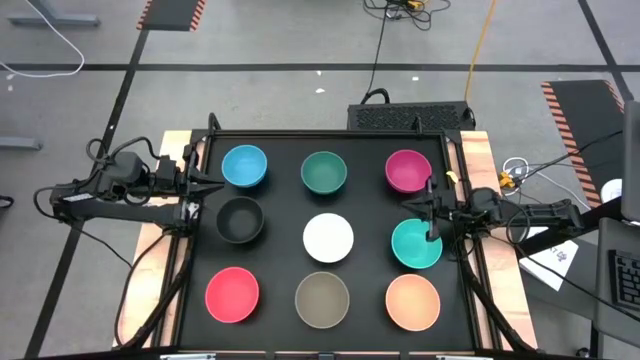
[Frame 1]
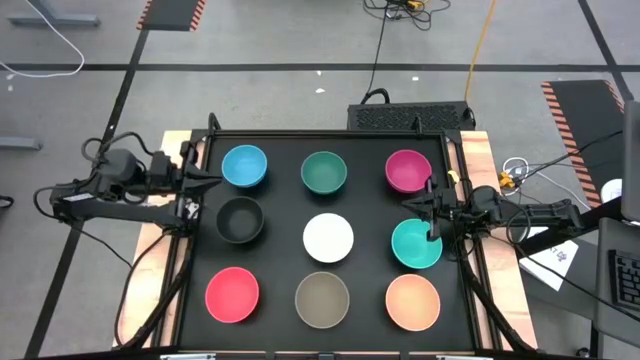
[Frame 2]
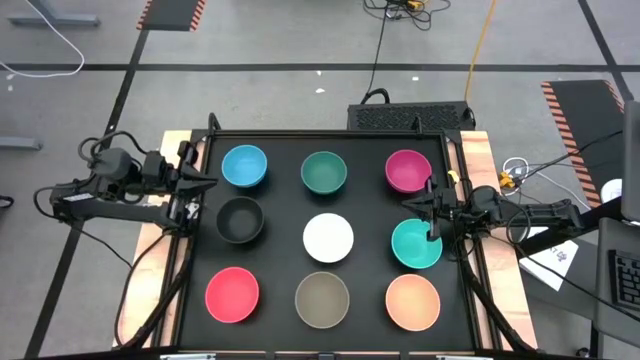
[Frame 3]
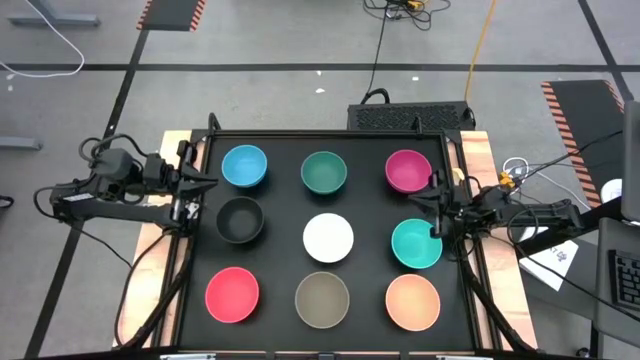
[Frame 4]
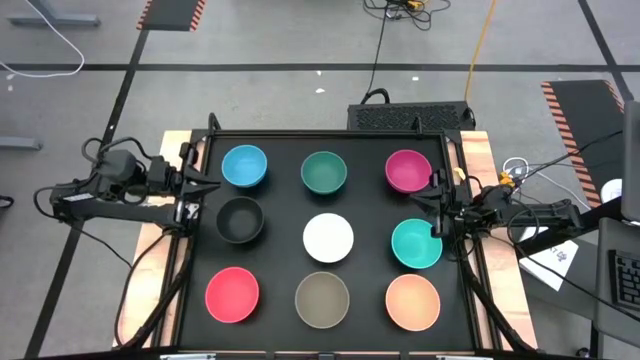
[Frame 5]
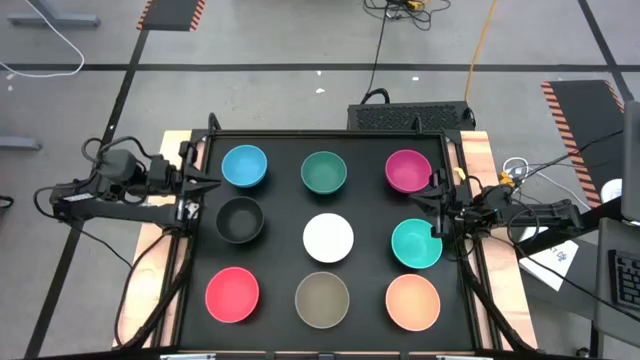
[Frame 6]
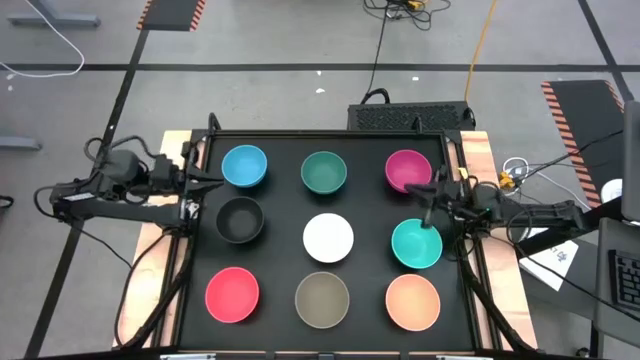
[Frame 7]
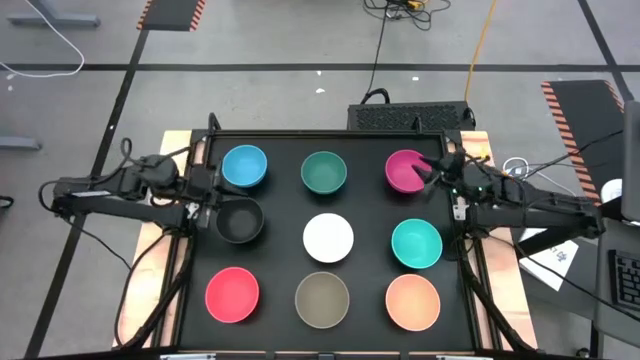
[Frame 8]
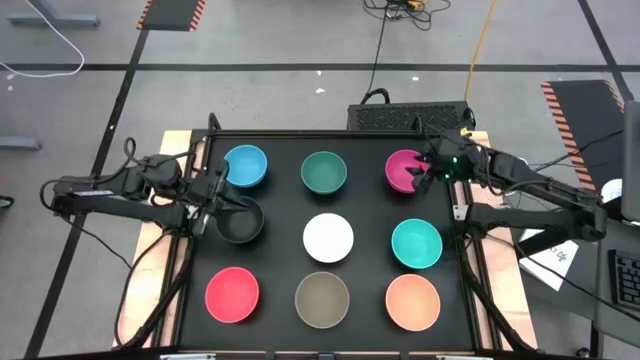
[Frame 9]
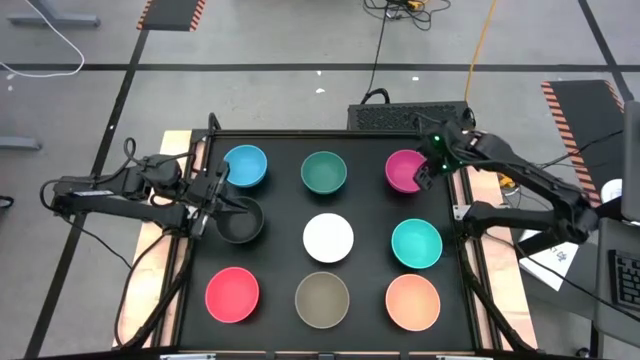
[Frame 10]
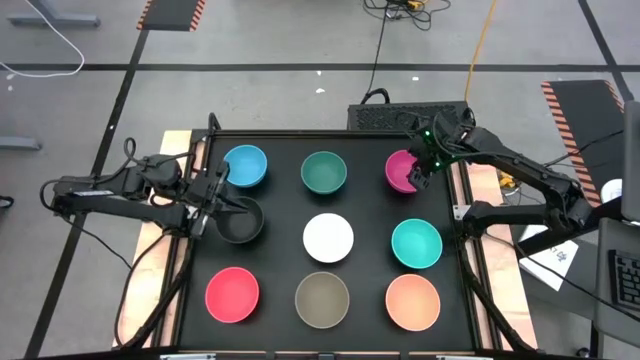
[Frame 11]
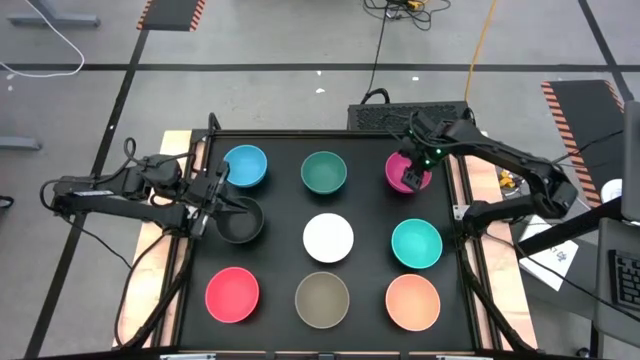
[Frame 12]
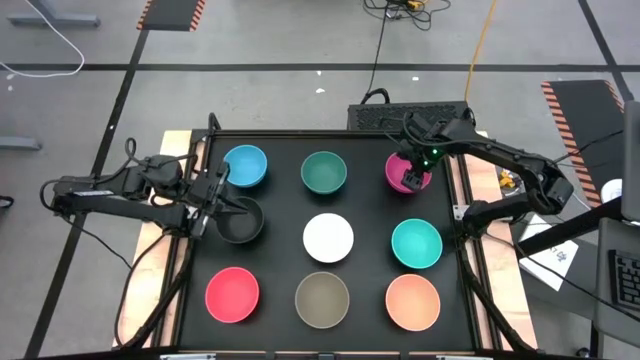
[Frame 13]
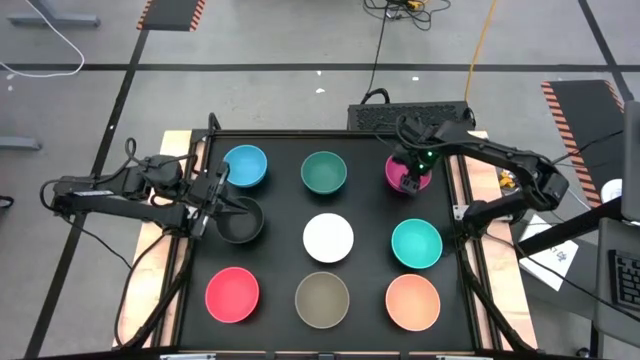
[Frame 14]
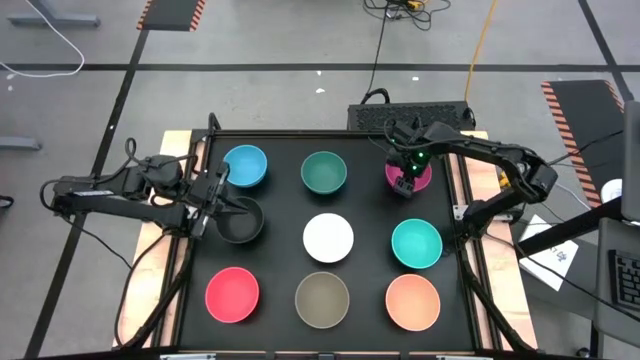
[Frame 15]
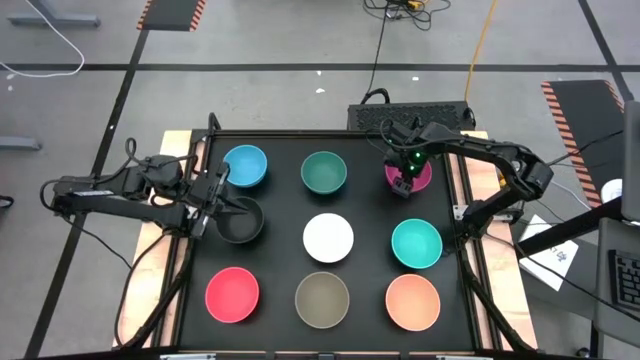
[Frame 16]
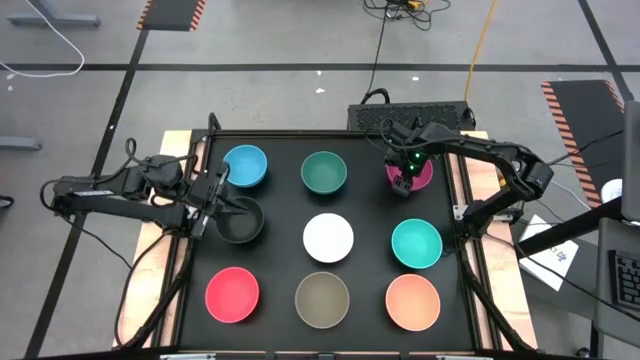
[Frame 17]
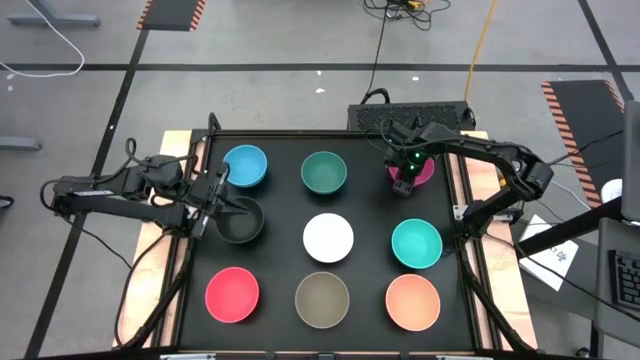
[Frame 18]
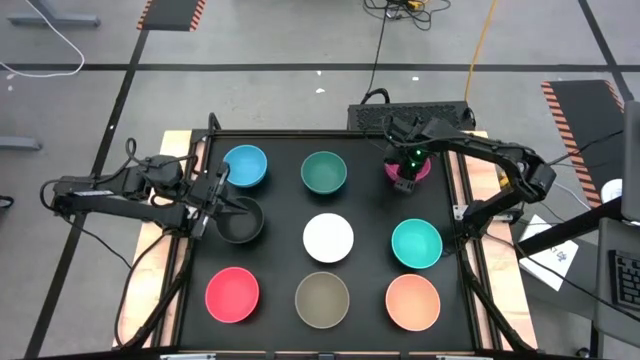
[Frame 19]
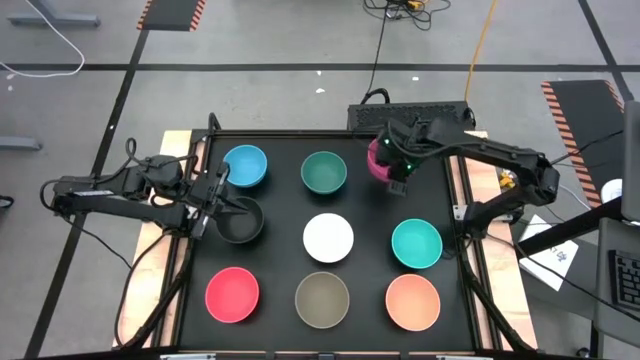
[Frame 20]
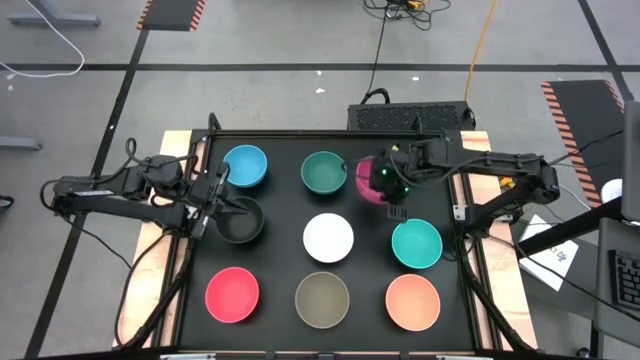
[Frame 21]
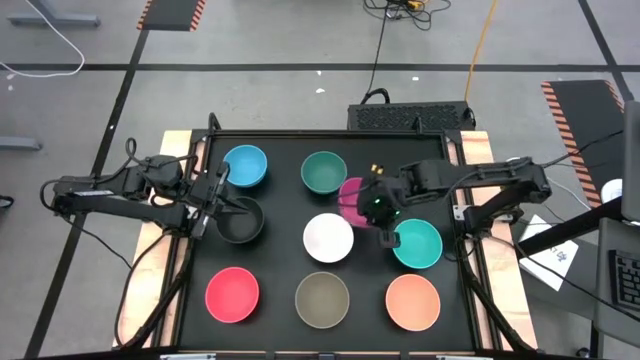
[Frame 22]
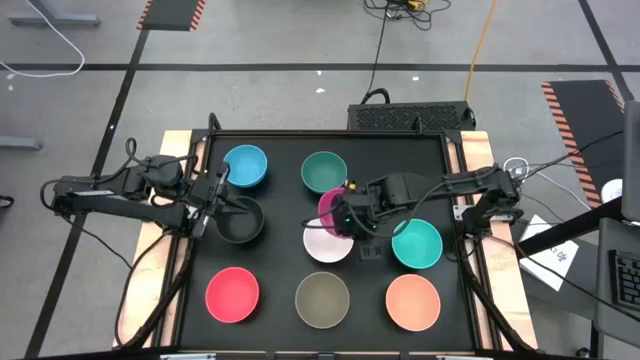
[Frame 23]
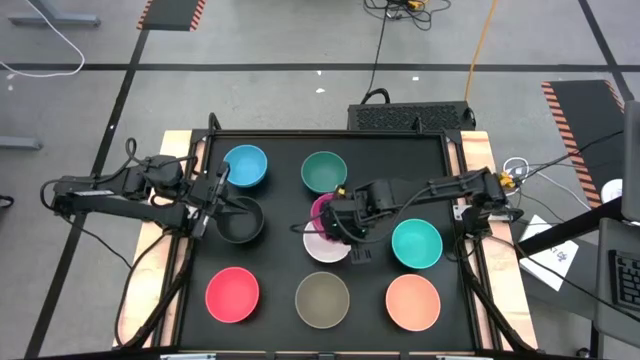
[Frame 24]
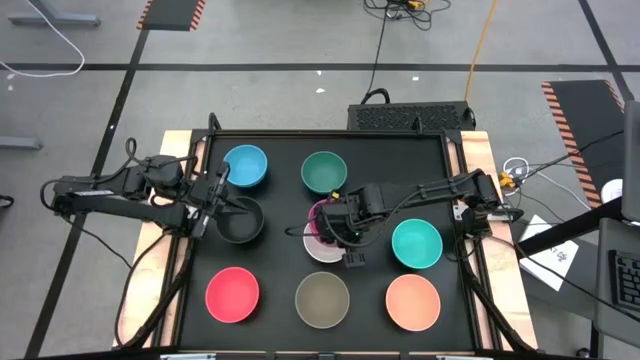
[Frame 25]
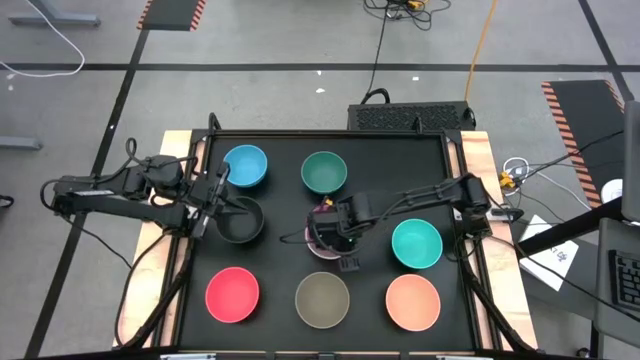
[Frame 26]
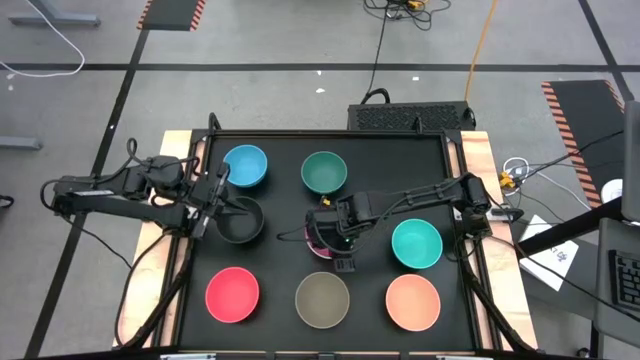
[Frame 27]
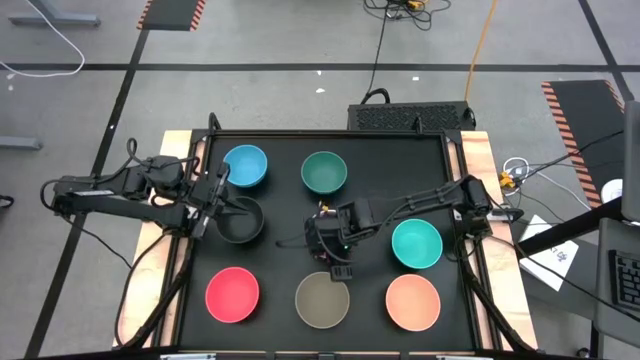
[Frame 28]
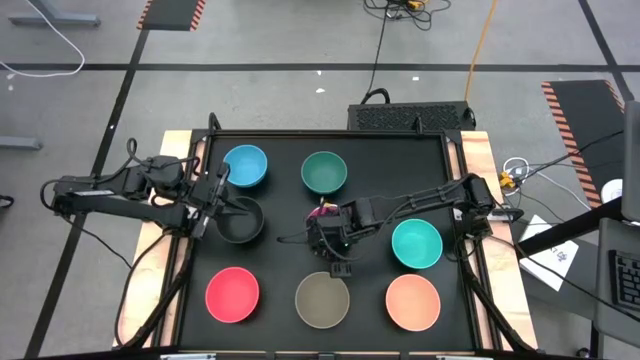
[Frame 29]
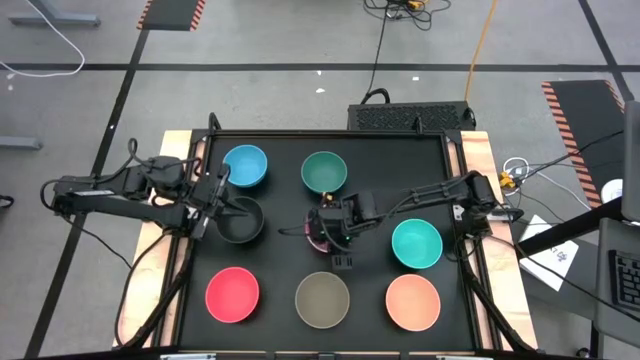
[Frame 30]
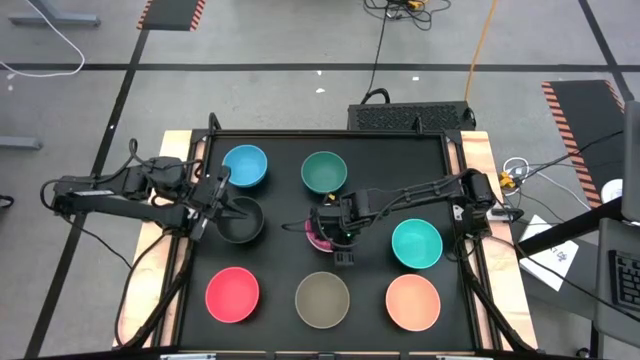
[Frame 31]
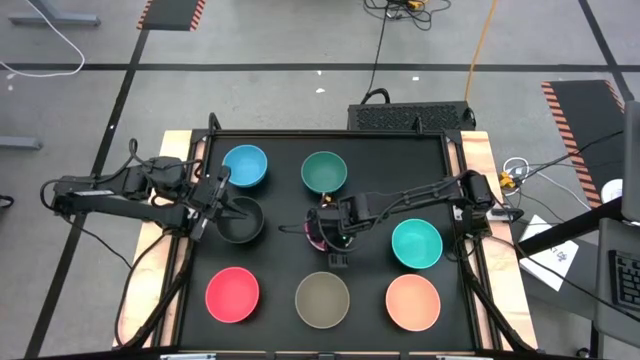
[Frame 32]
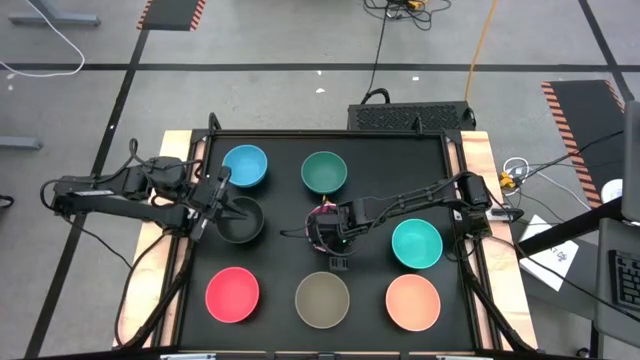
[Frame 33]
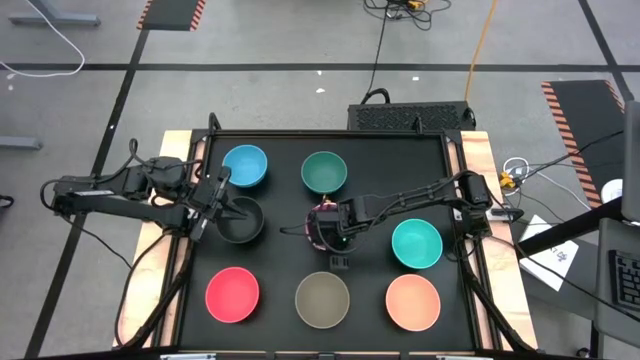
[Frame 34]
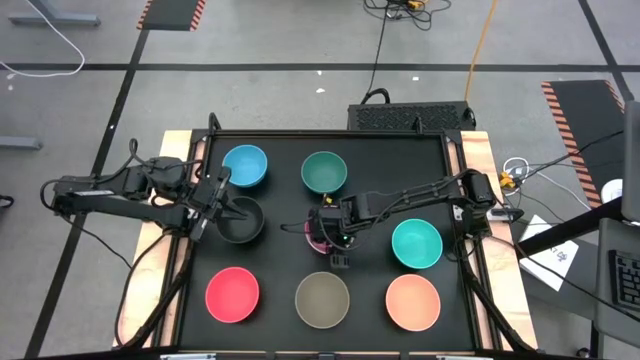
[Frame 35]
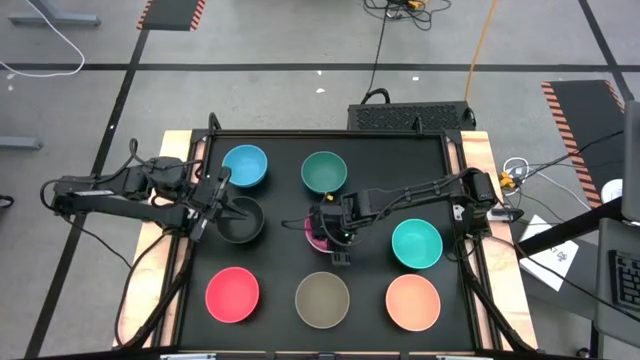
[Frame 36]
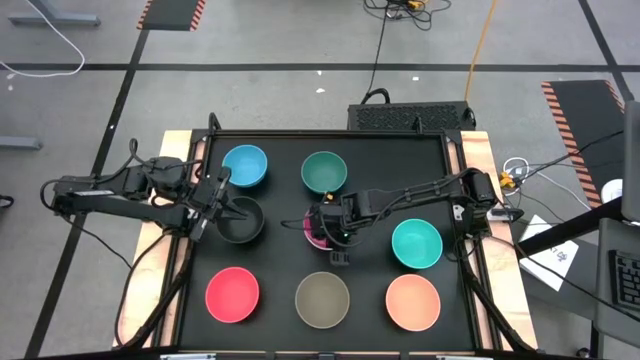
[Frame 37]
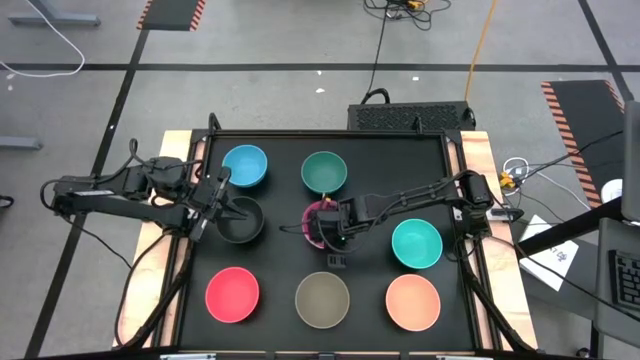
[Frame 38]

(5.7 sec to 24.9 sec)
Task: Nest bowls inside each other
Stack the pink bowl on top of the white bowl
